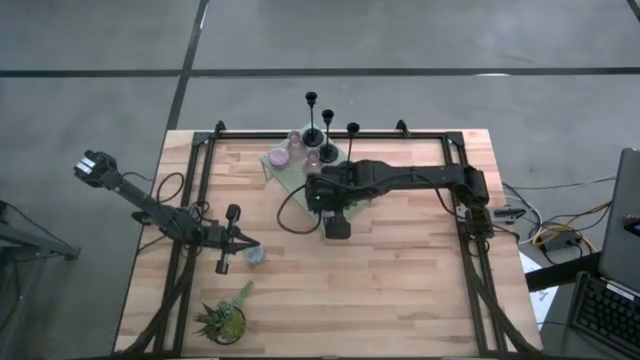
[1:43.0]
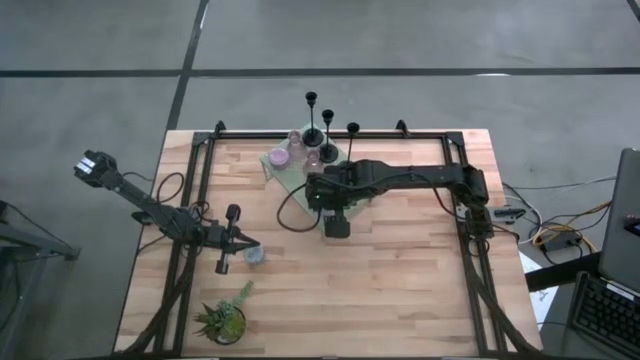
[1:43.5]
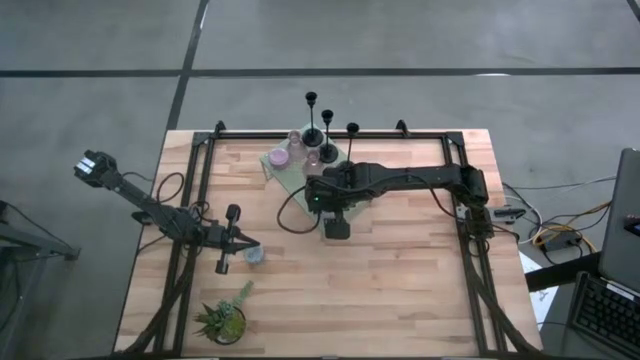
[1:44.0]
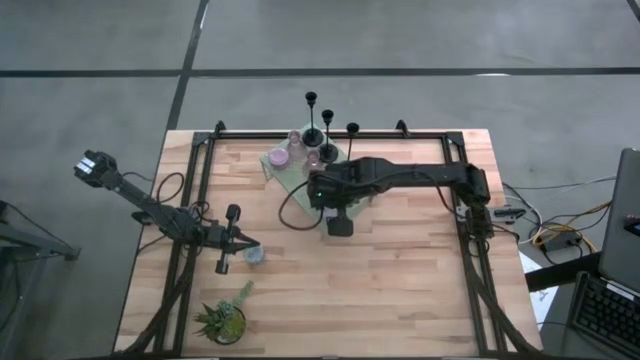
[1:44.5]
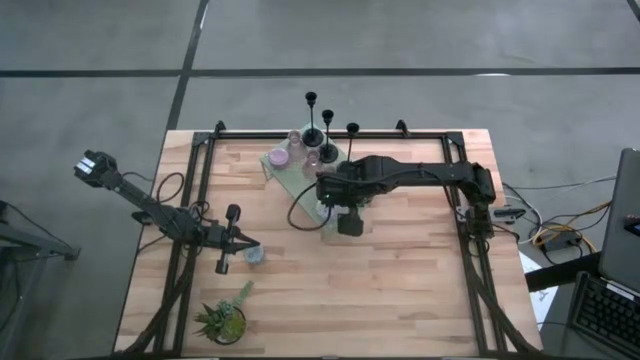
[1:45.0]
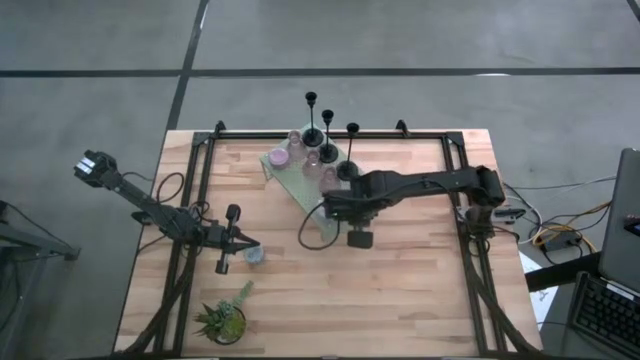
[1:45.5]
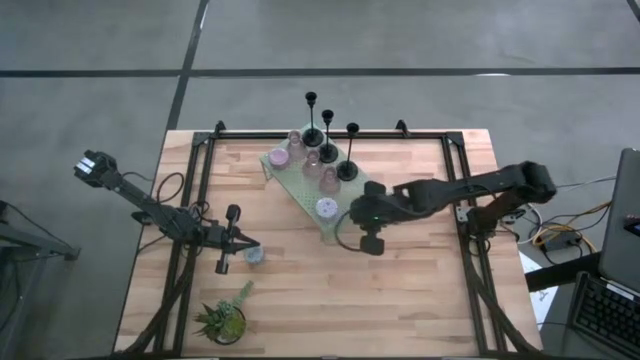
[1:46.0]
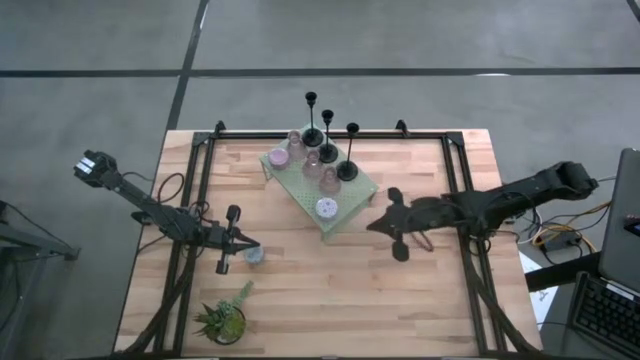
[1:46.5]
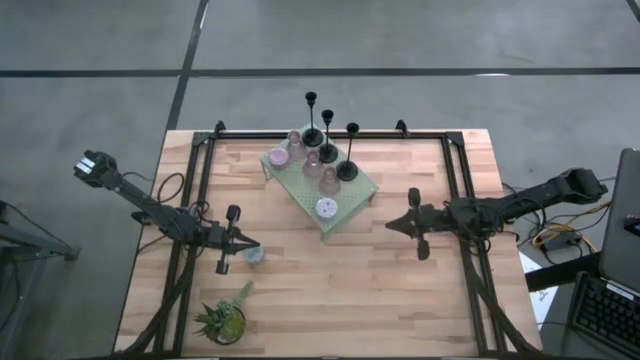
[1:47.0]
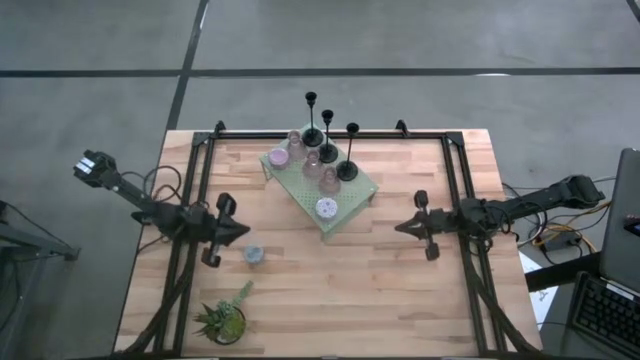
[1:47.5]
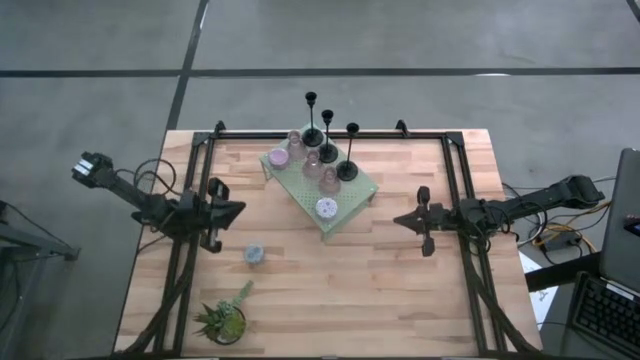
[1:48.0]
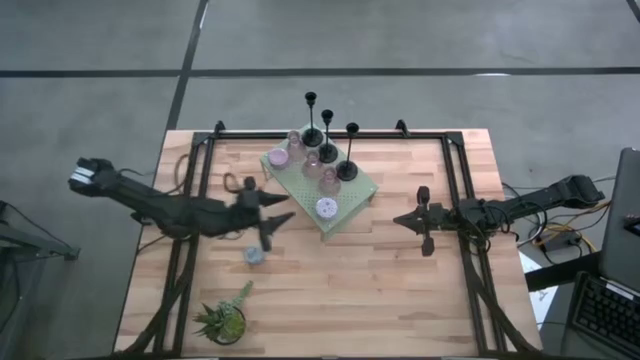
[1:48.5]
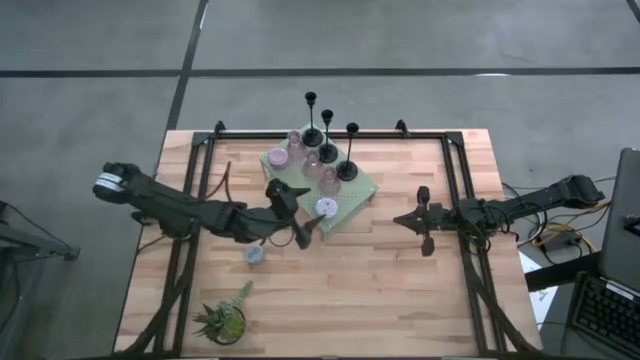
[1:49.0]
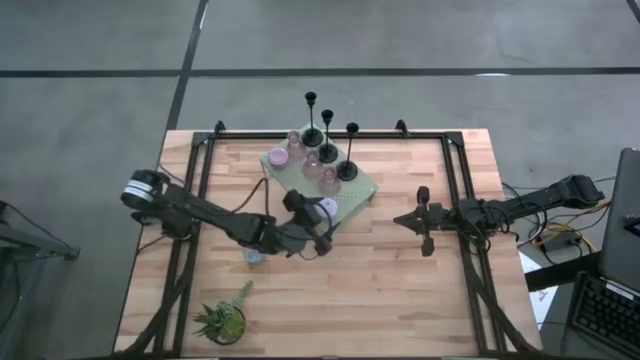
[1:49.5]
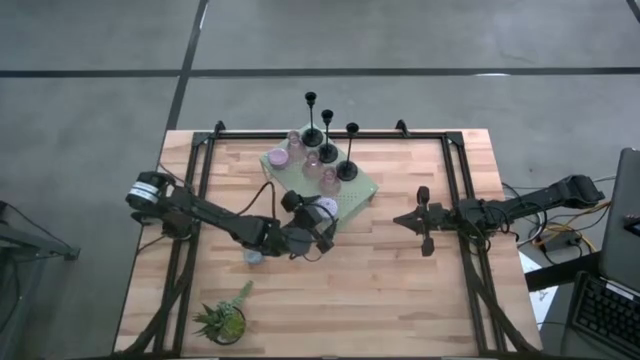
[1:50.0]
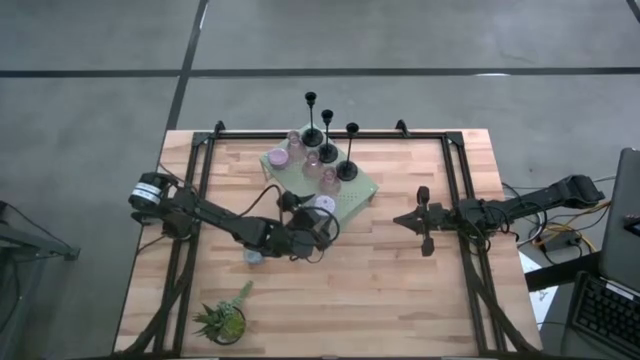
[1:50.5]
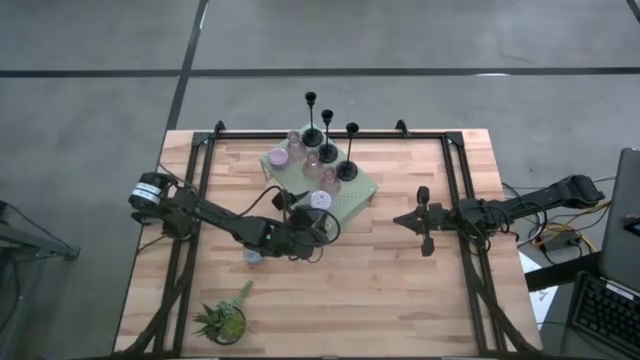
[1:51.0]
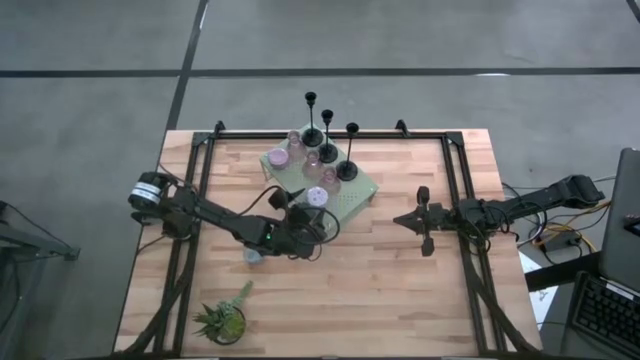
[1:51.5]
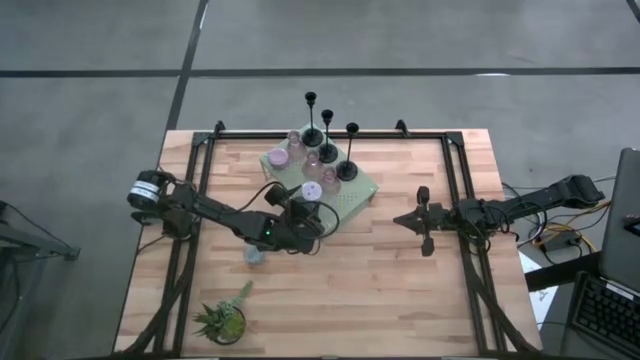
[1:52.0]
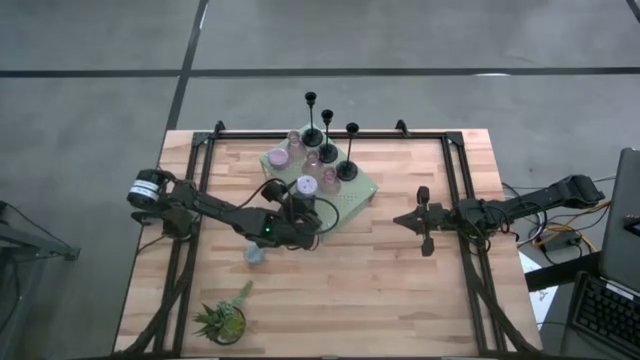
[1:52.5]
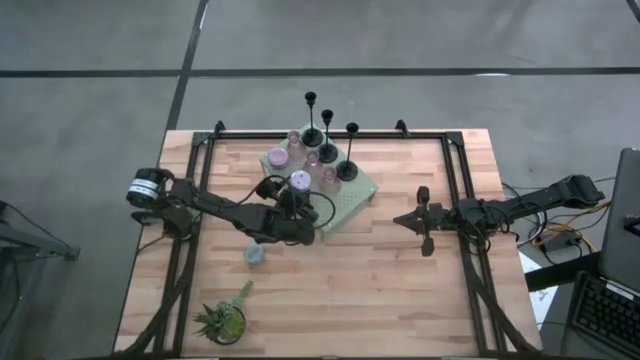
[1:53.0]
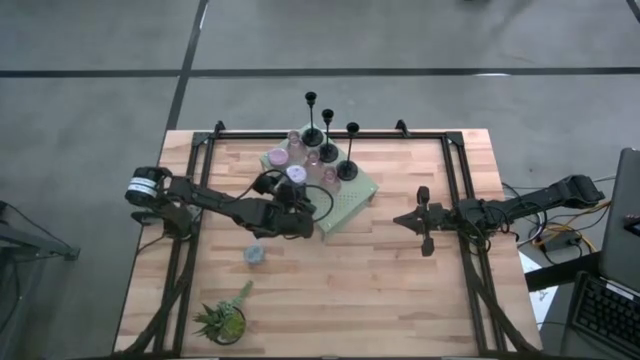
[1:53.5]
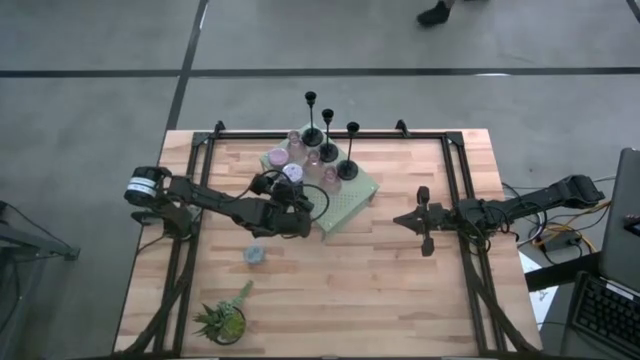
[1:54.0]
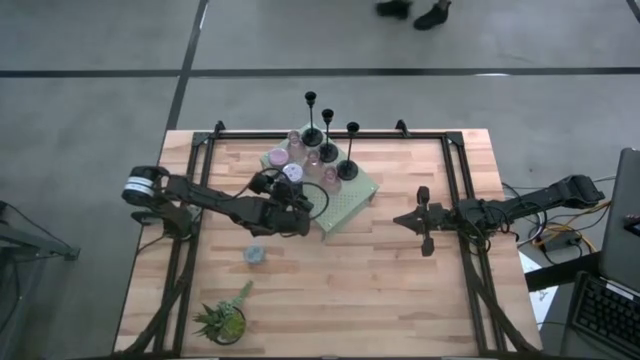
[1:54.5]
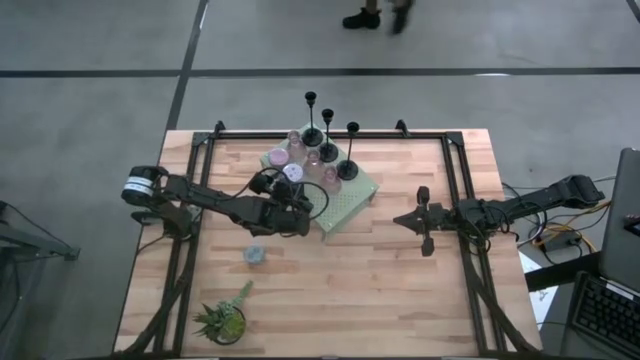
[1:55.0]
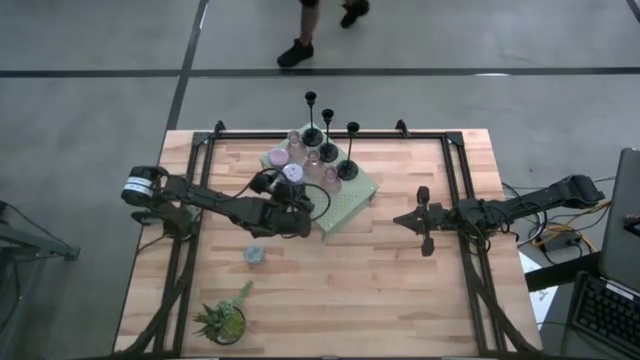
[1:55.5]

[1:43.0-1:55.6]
Task: Pick & Place candle stick holders
Put the white scented candle on the shelf aligned with the pink glass candle holder

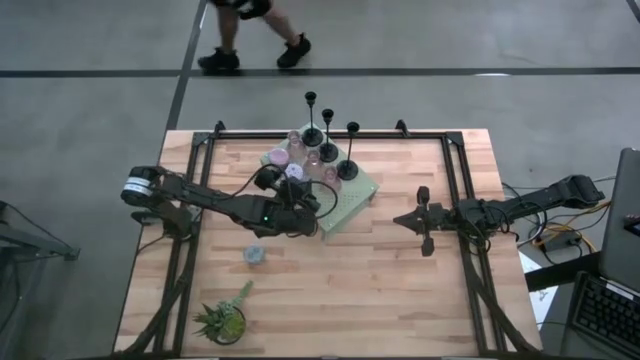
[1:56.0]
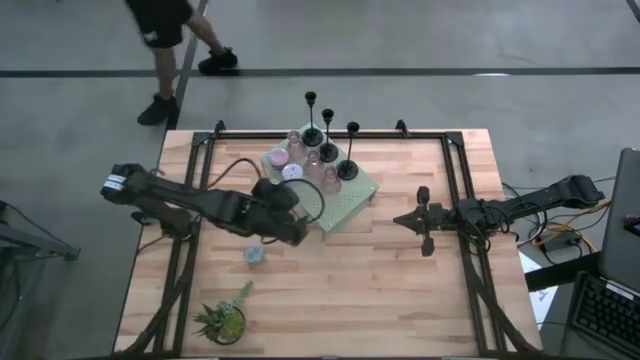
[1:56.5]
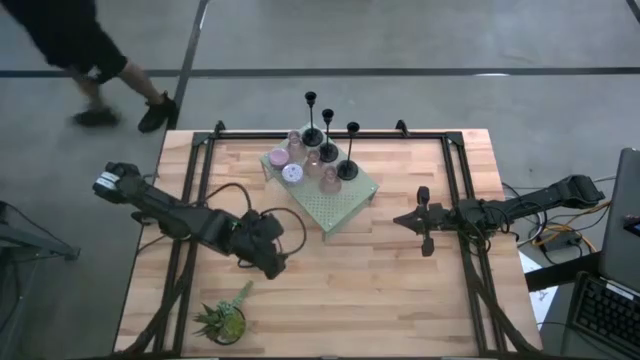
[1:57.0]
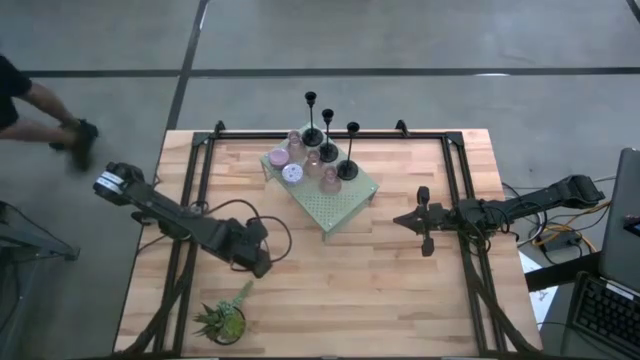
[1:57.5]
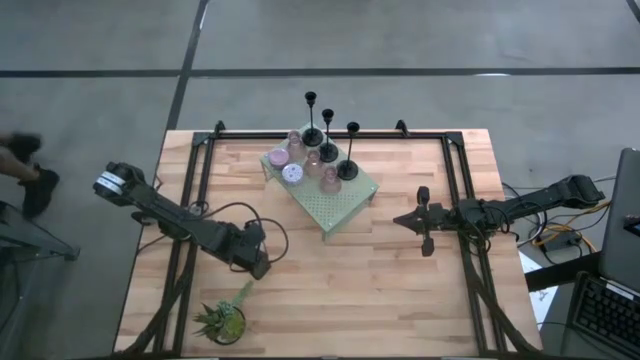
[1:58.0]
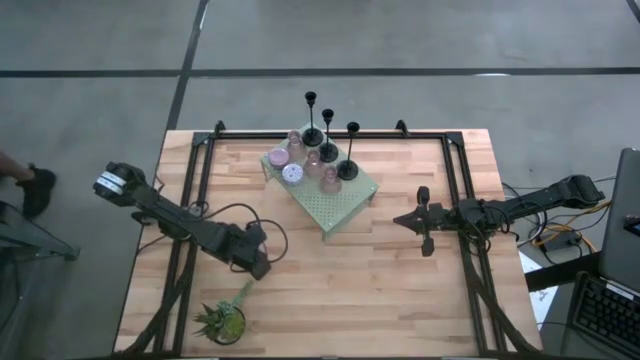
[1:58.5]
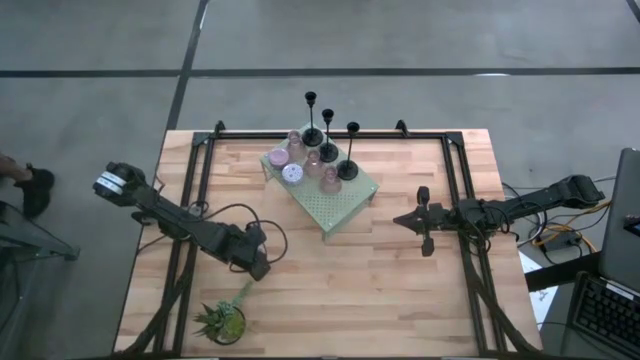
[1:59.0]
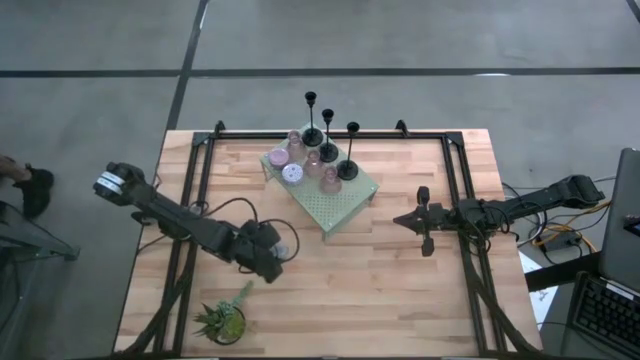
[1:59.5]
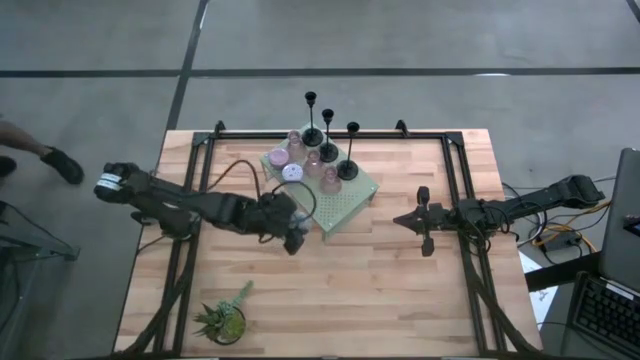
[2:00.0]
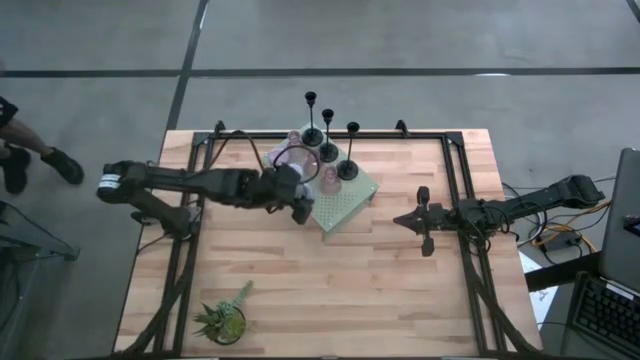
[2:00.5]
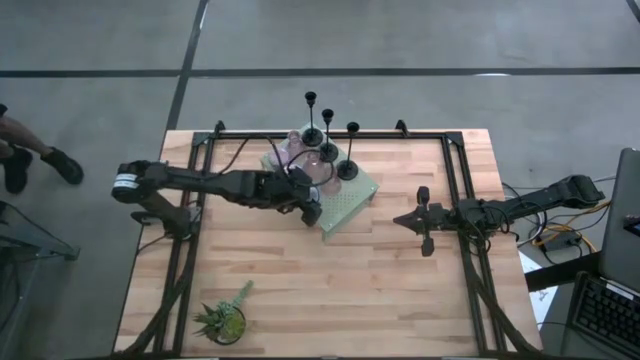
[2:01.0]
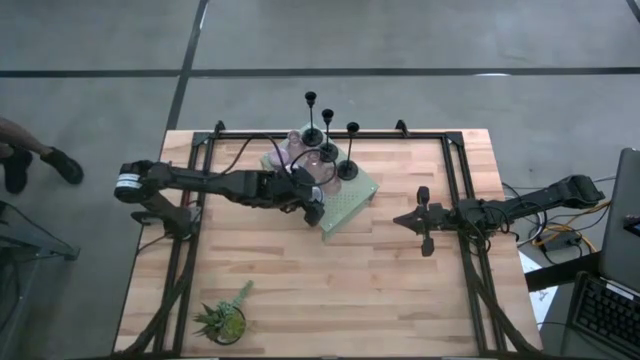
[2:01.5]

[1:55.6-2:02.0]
Put the blue scented candle on the shelf aligned with the pink glass candle holder

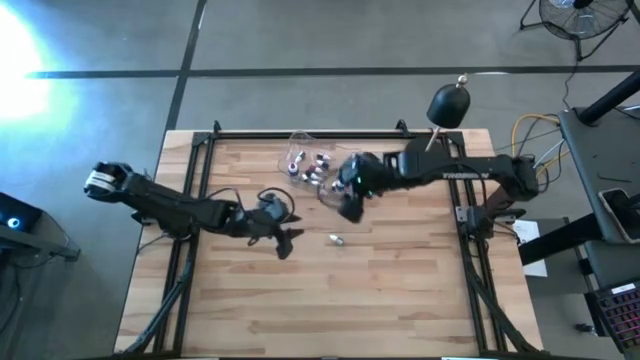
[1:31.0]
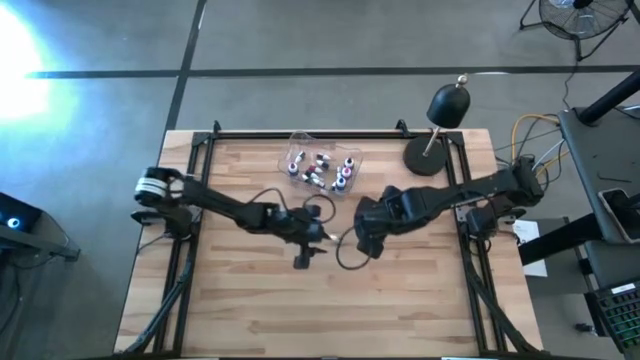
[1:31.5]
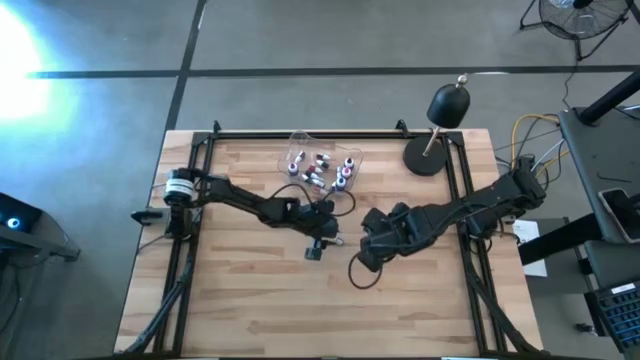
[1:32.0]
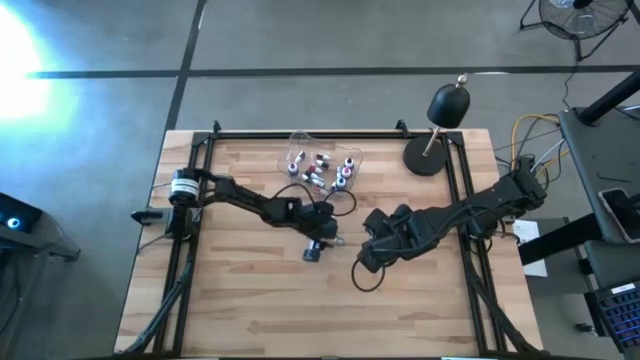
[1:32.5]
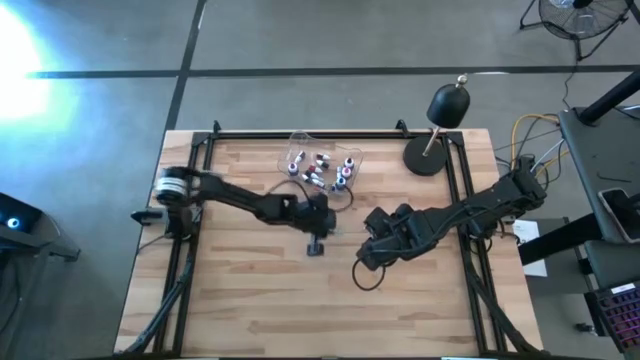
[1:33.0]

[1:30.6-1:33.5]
Task: Pick & Place food coloring
Put the small green food coloring bottle into the transparent bin
